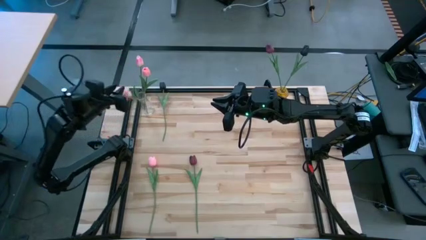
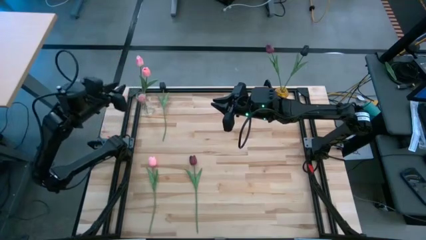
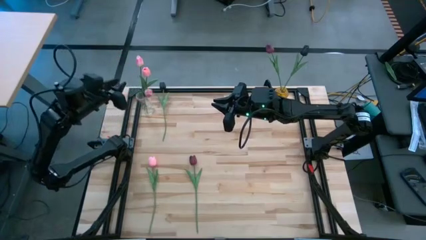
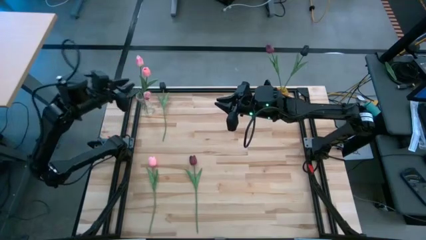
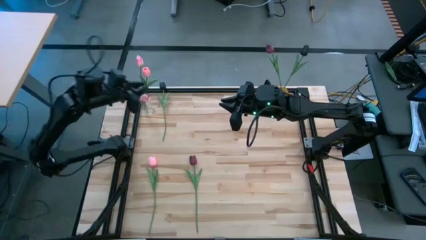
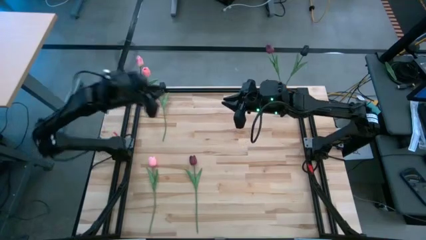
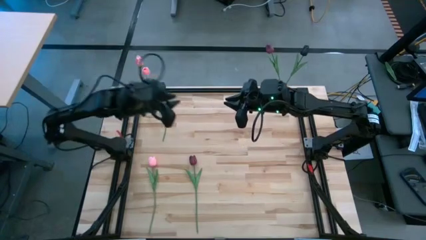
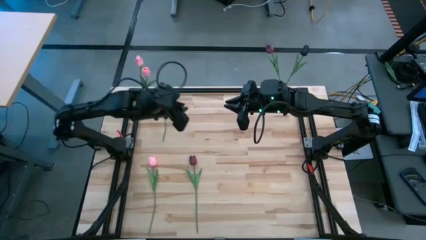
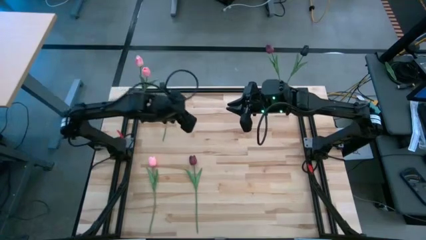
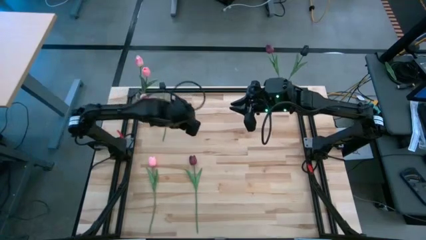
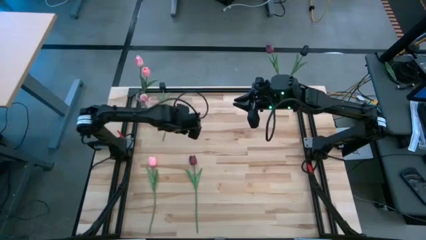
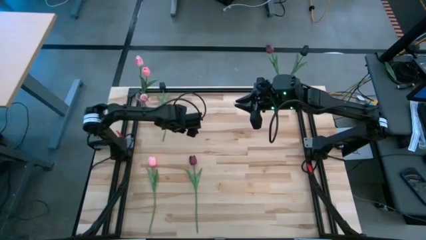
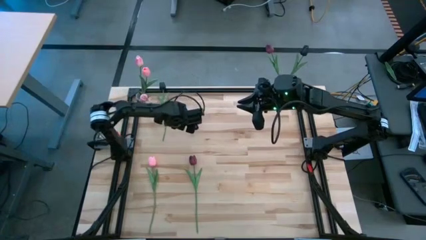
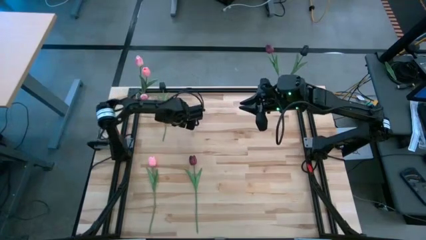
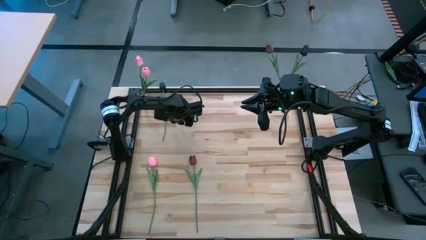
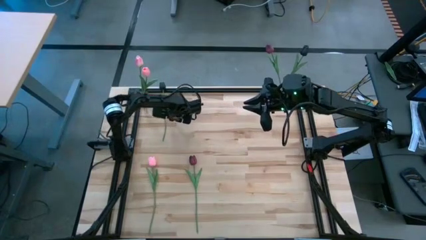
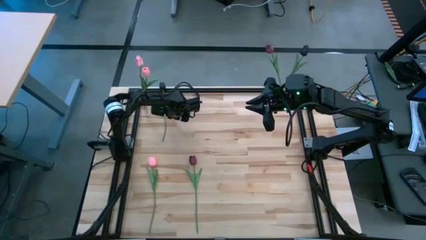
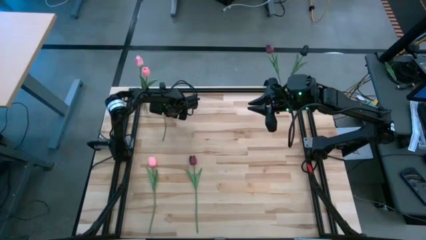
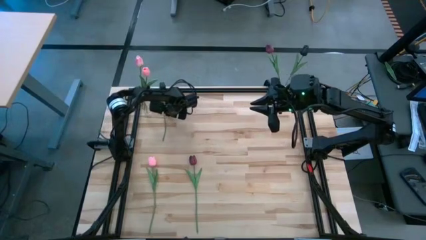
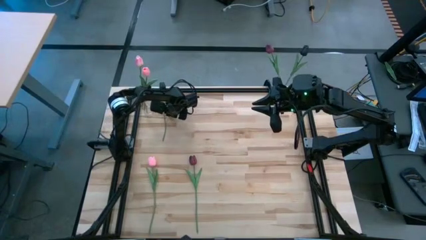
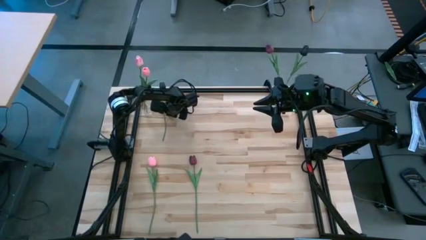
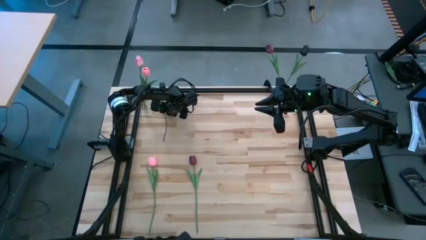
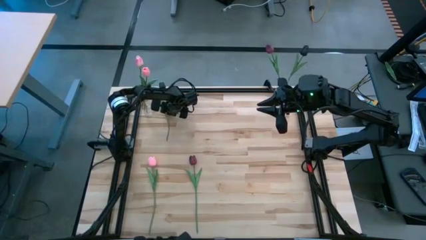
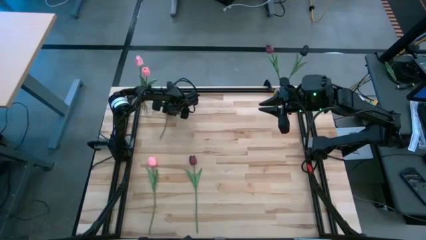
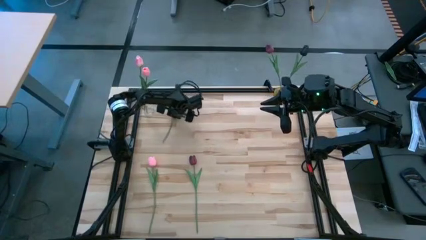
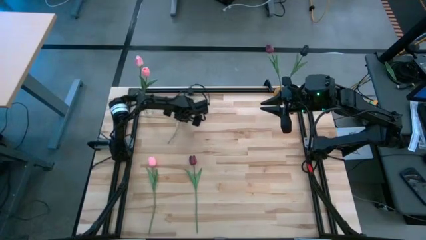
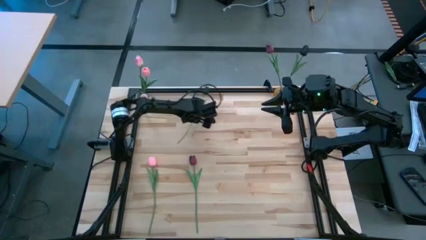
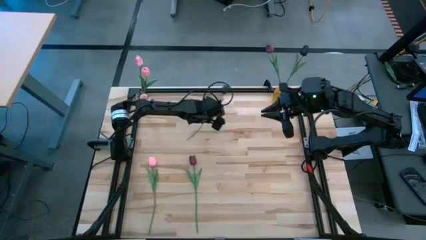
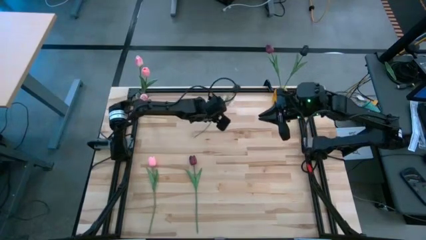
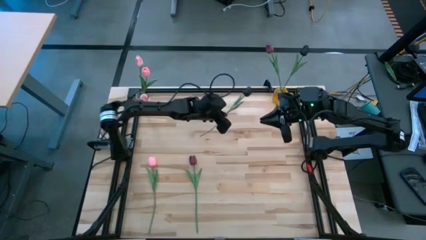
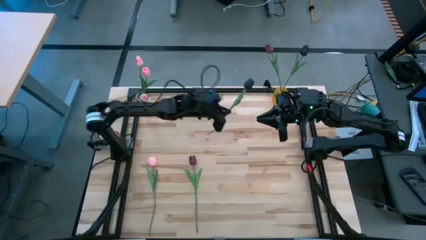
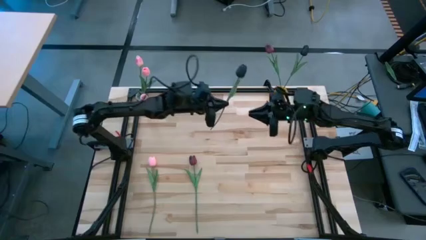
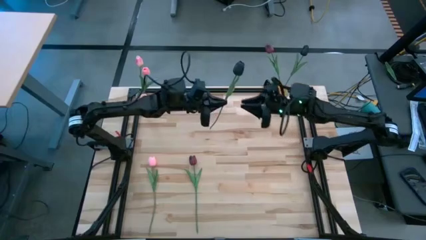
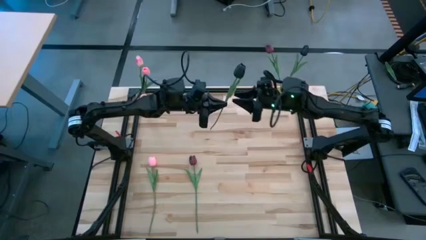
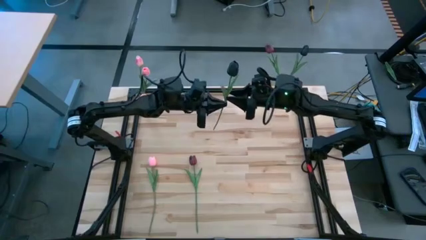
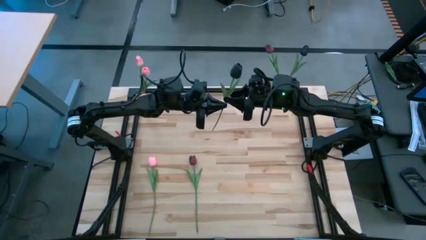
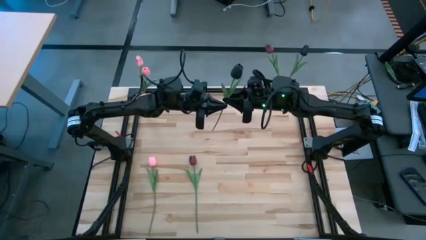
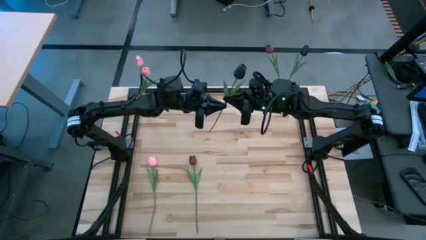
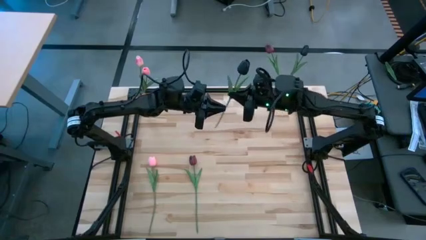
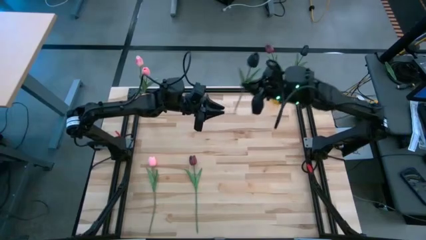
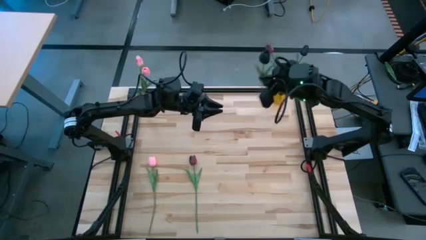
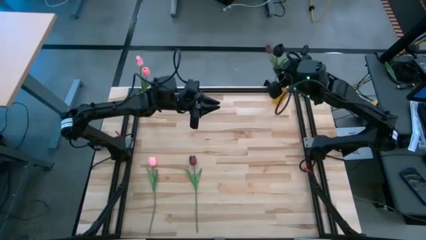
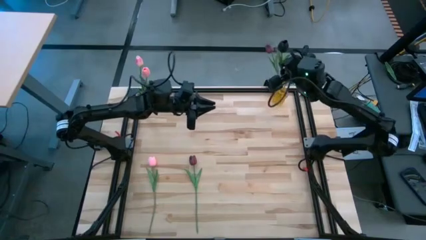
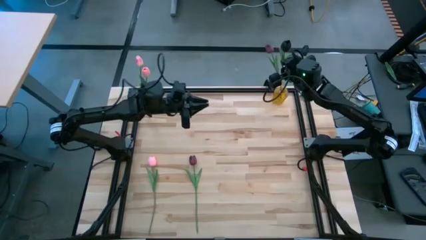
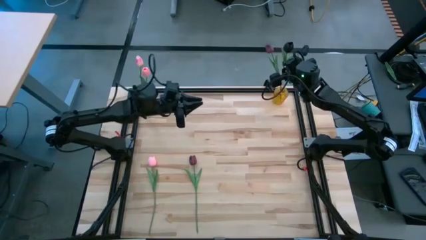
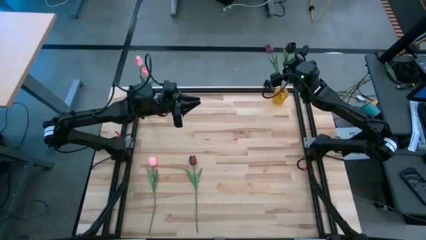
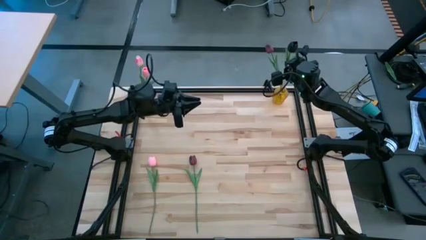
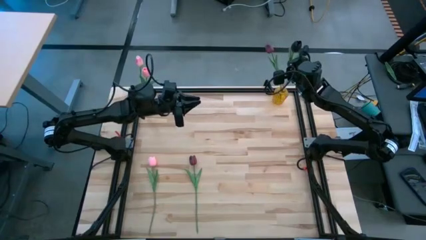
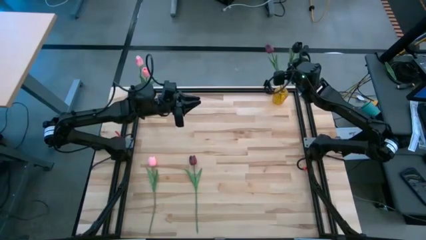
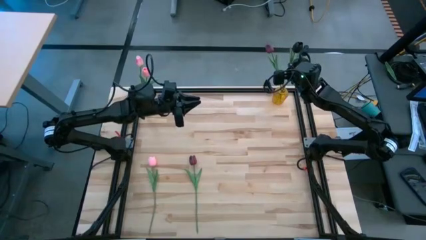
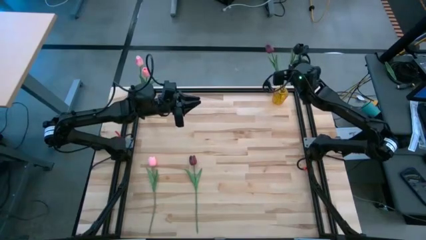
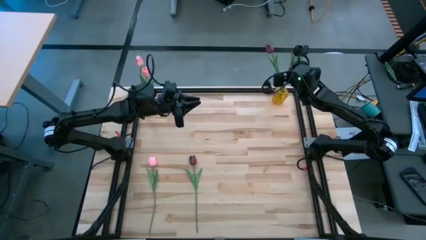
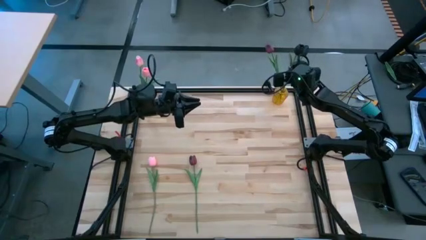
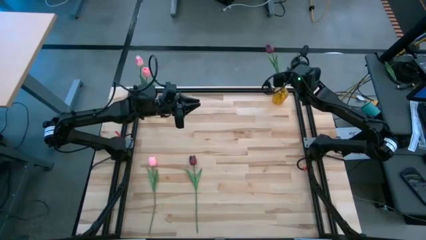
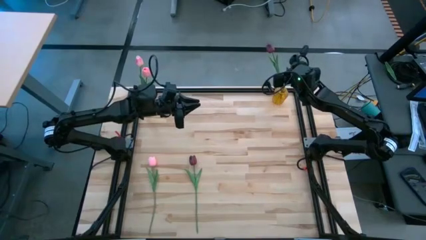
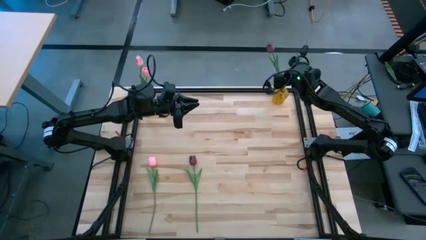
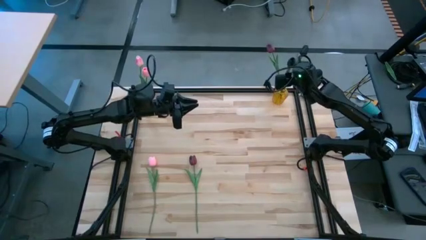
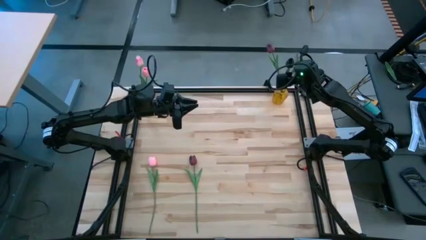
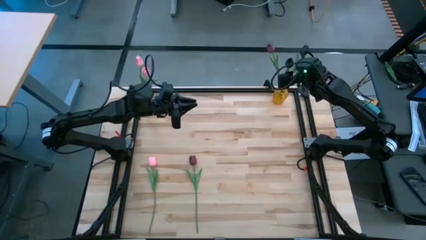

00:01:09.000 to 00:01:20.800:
Task: Sort flowers into vase by color
Put the black flower into the yellow vase

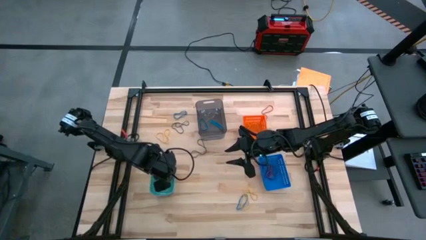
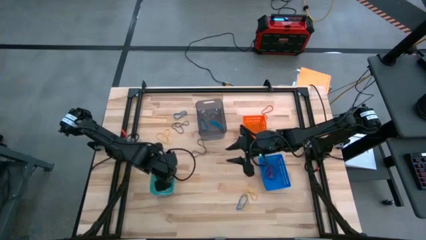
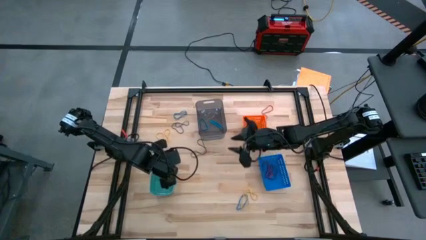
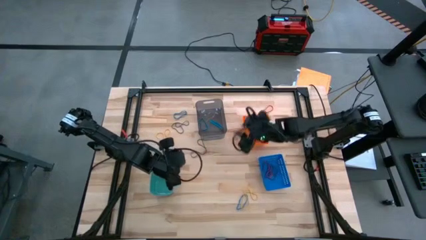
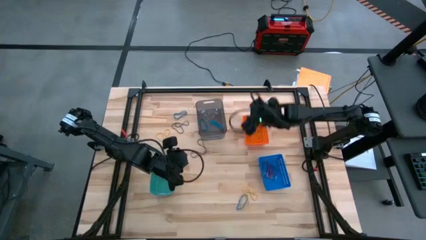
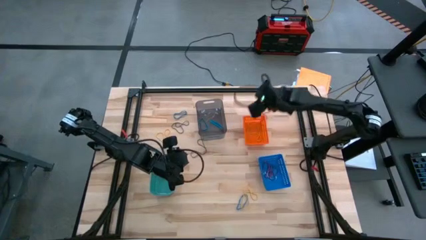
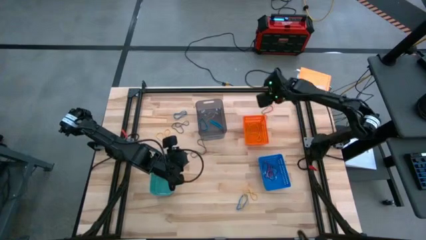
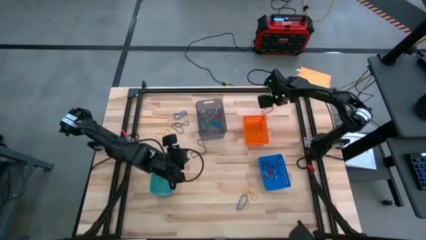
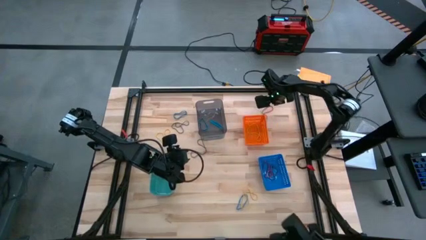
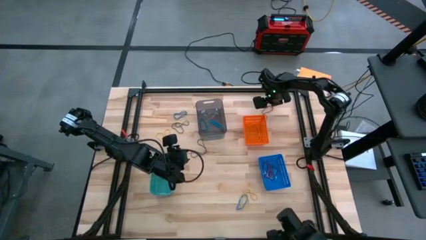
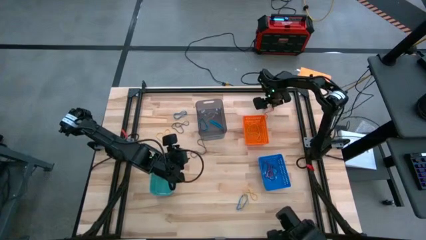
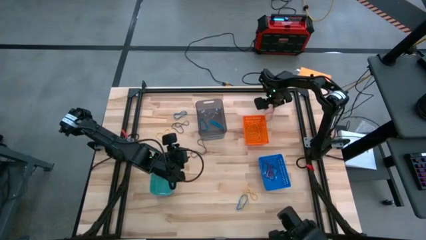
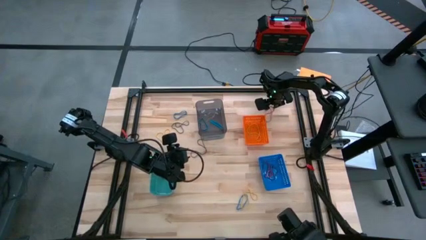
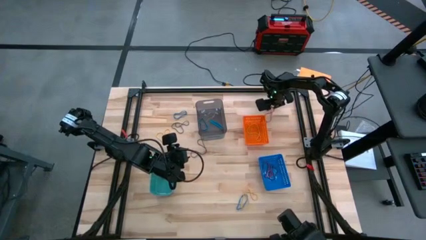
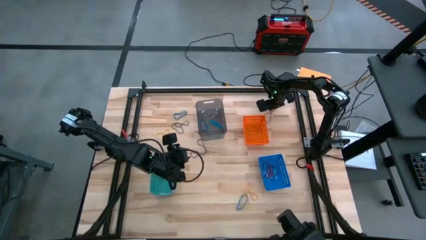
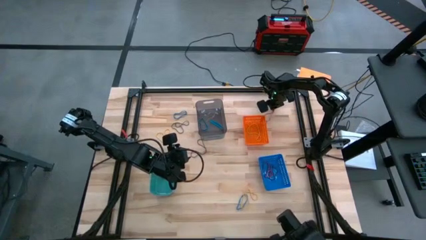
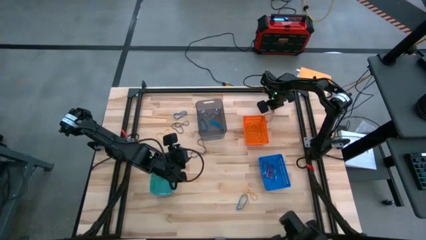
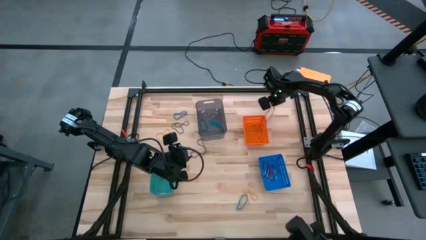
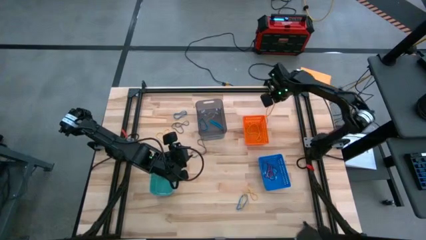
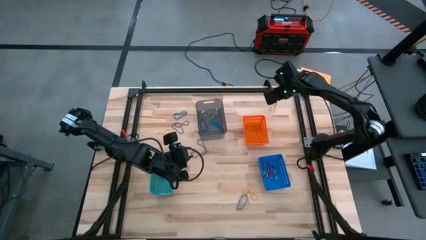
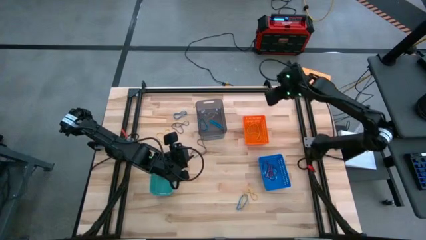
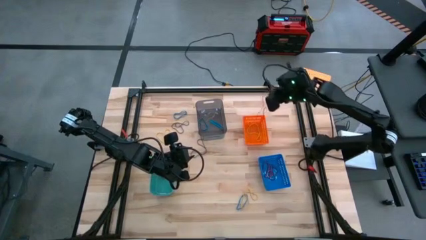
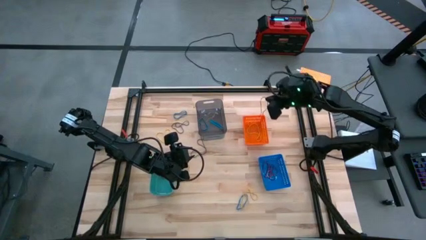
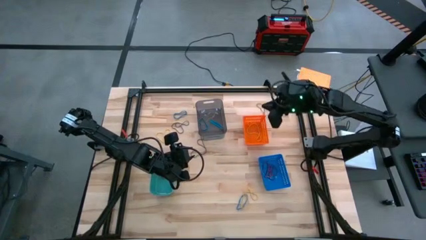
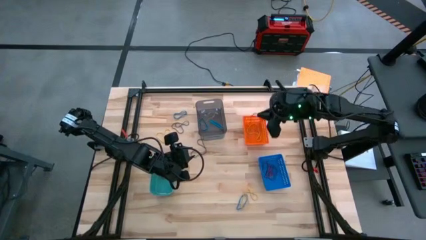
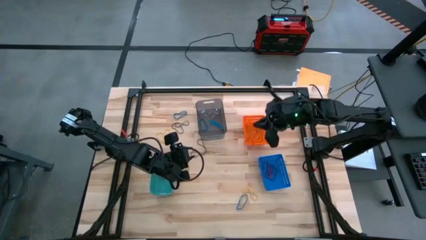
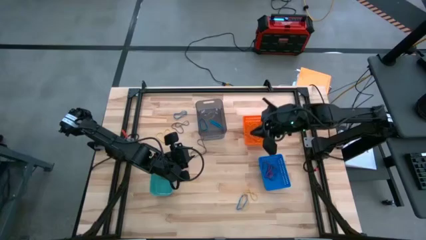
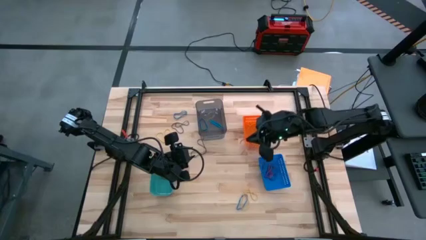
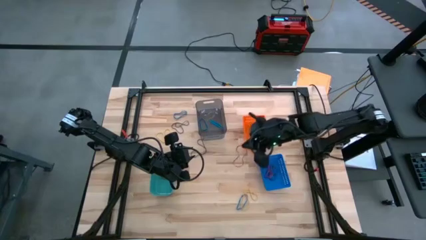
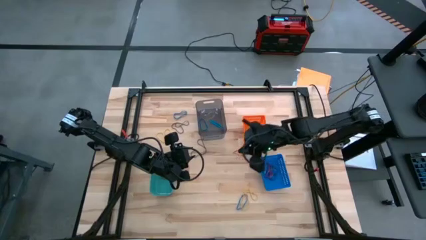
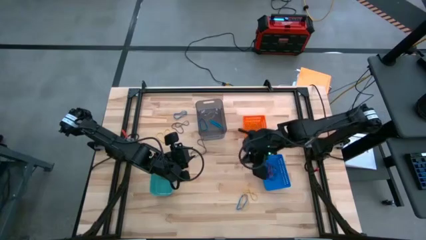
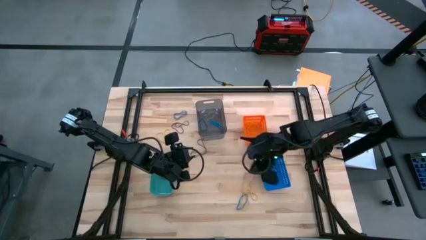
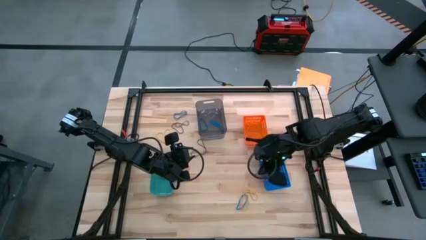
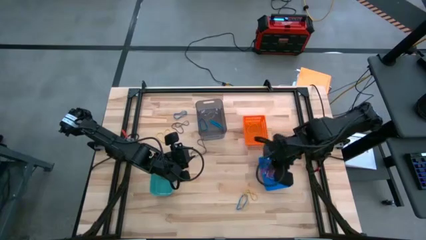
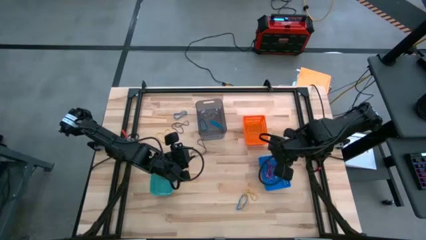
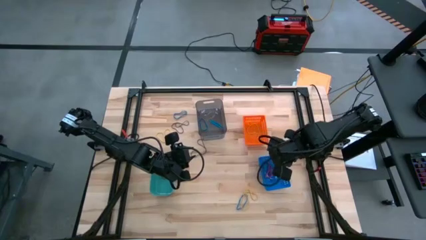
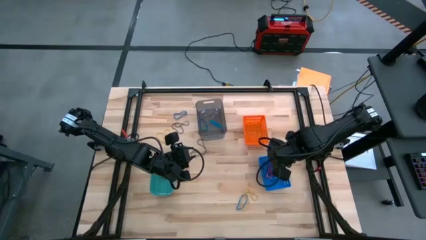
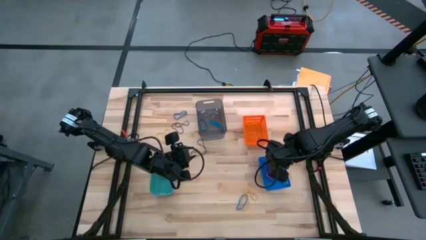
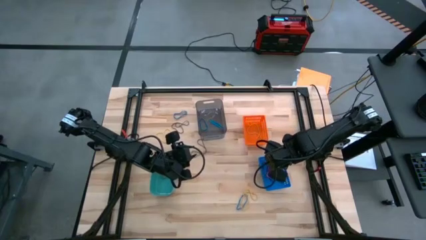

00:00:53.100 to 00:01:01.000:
Task: Sort rubber bands into baskets
Put the red rubber band into the blue bin
